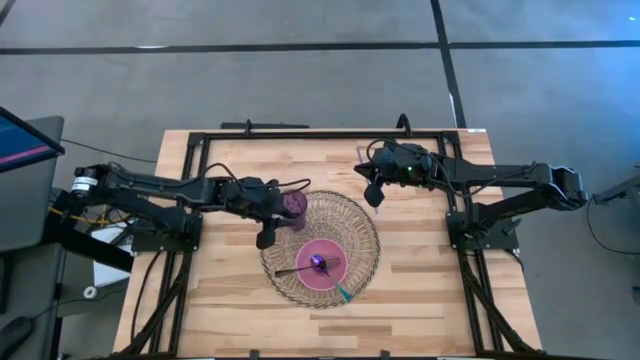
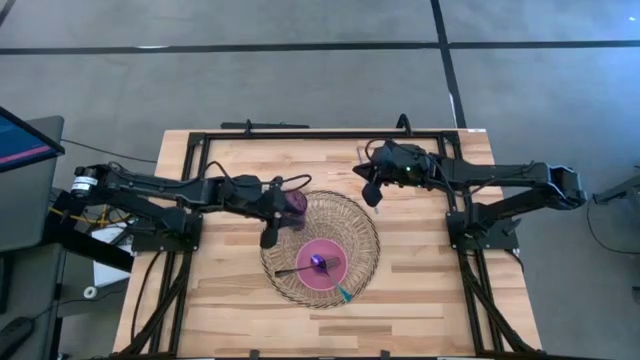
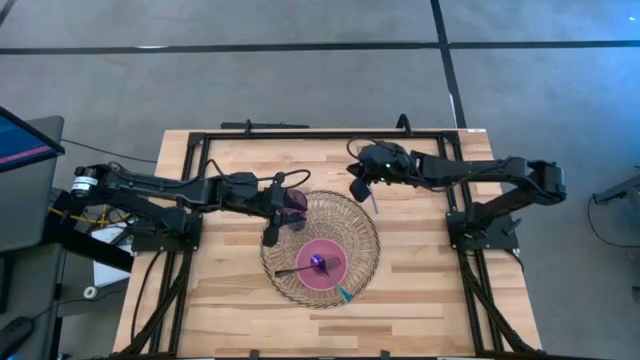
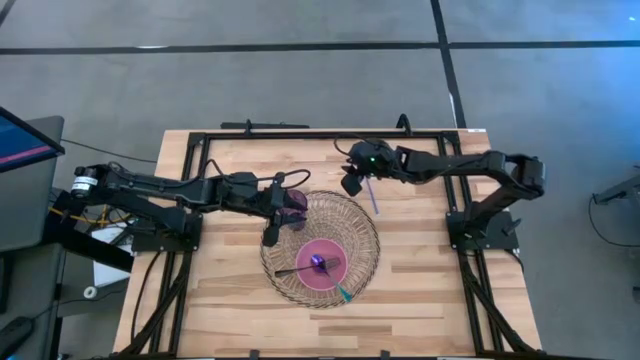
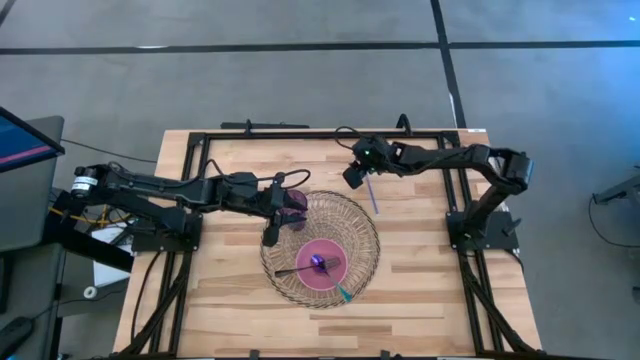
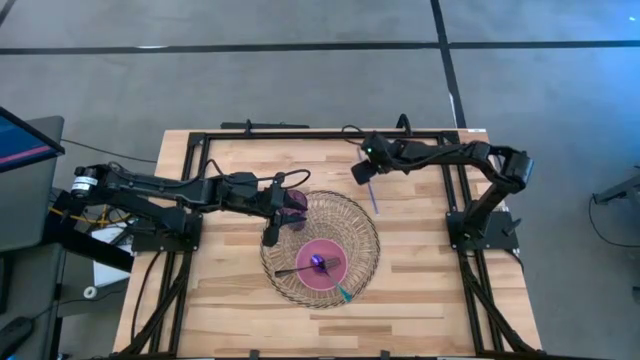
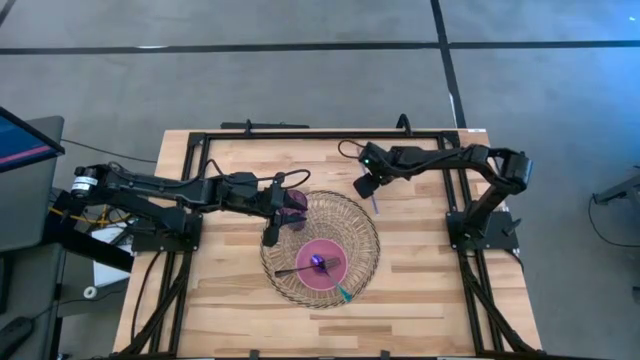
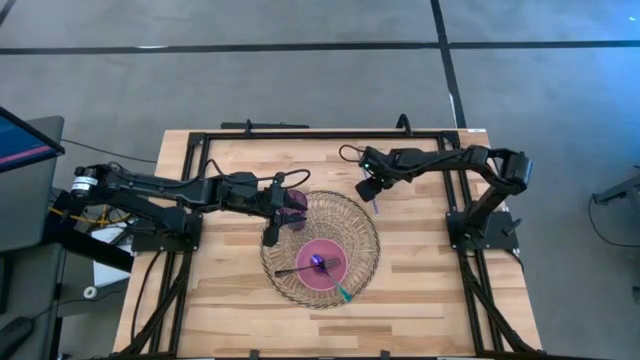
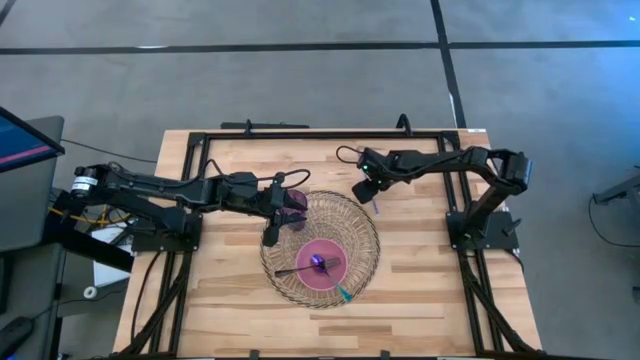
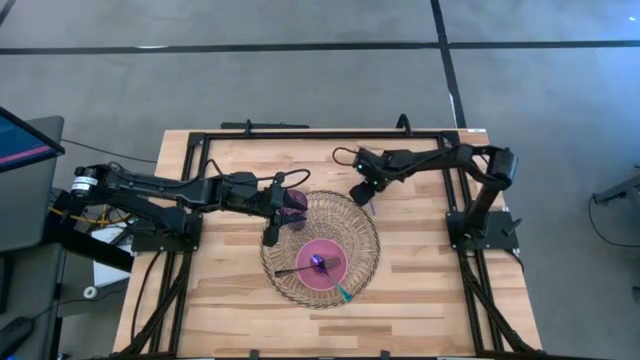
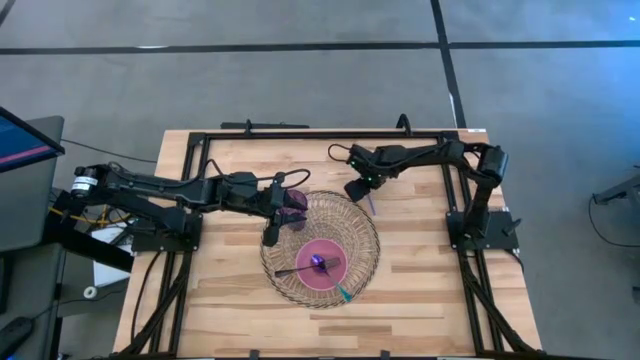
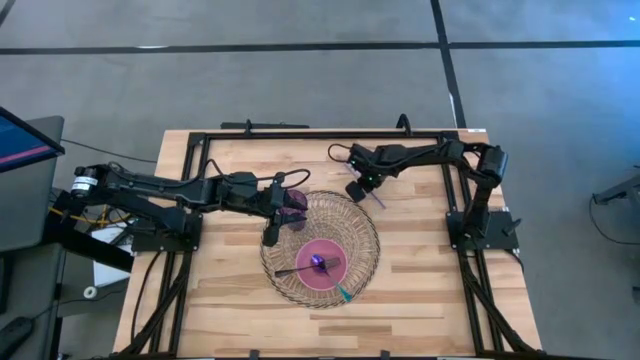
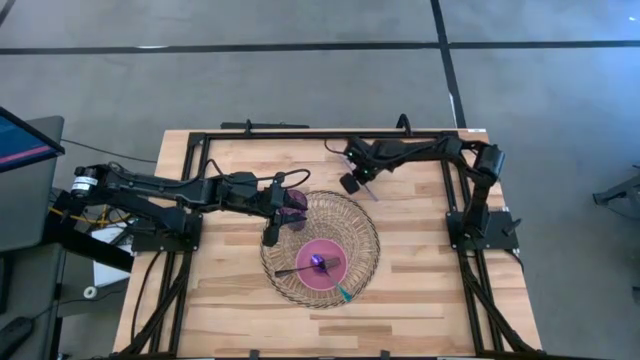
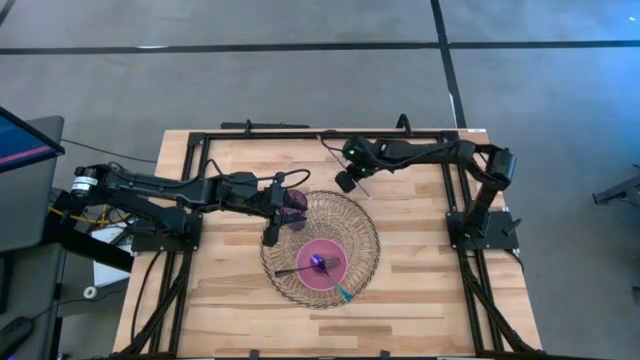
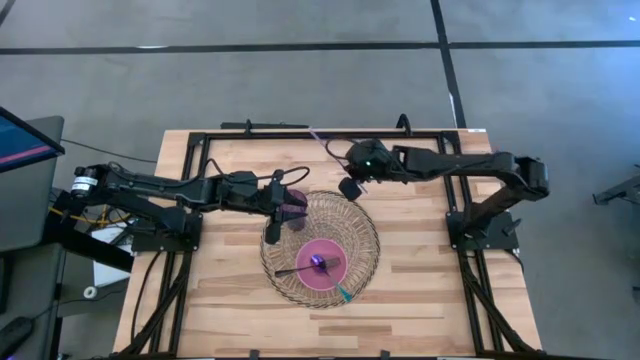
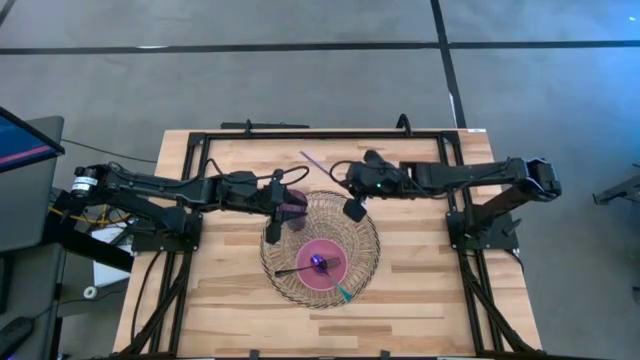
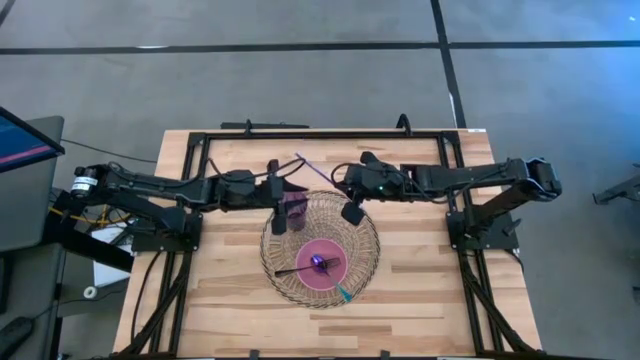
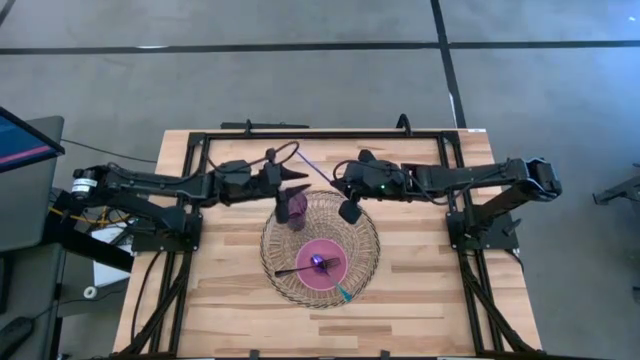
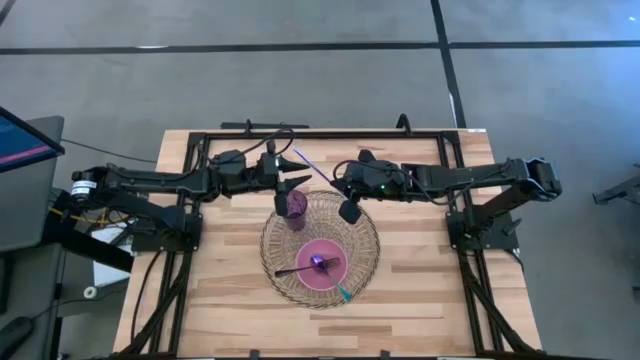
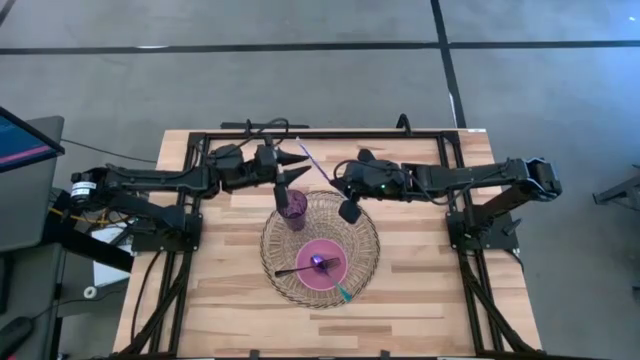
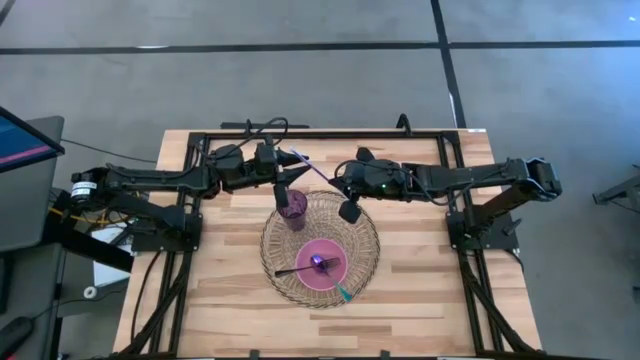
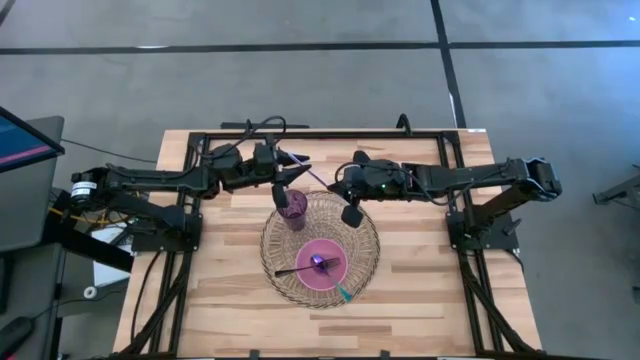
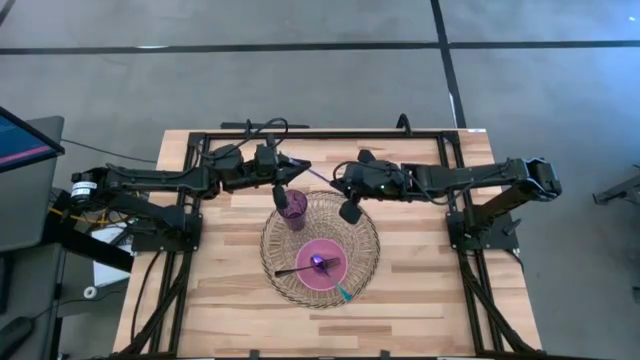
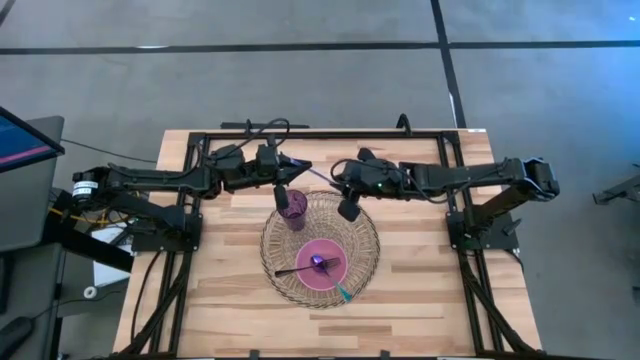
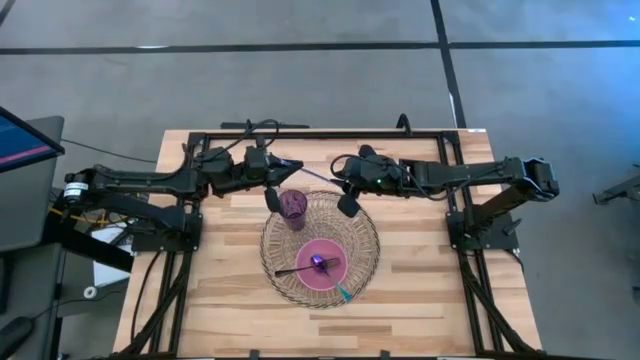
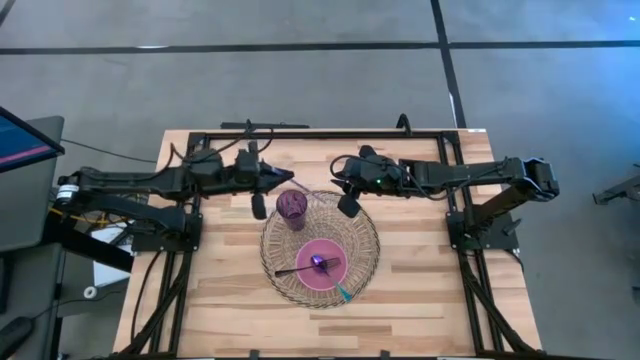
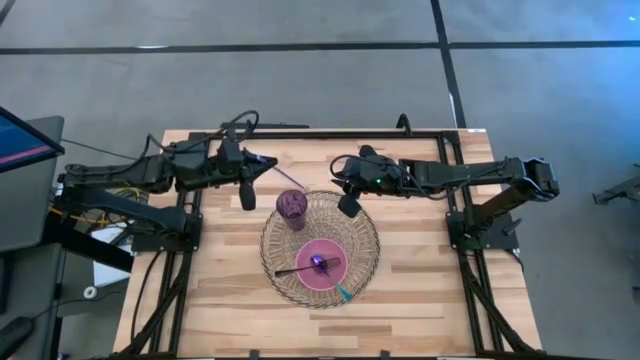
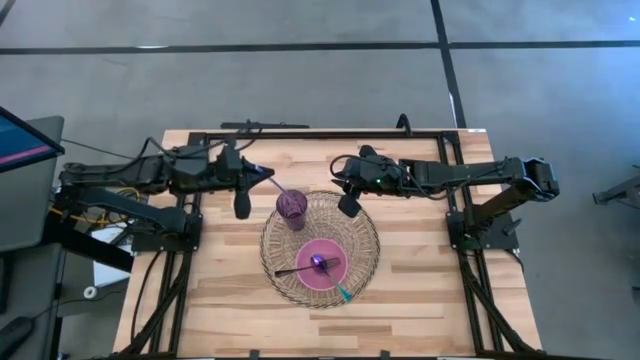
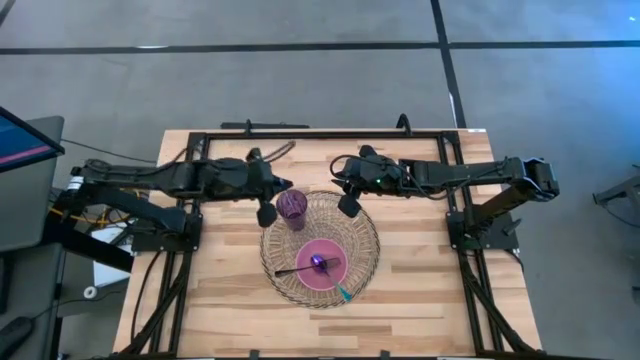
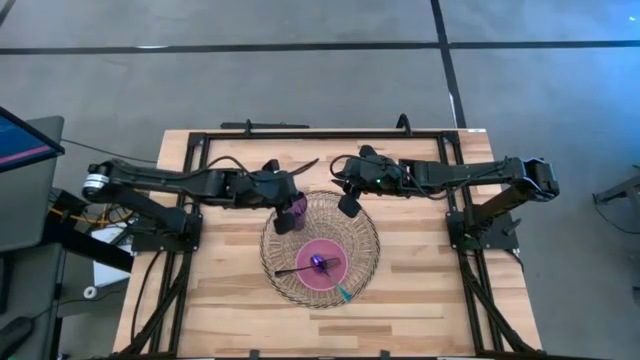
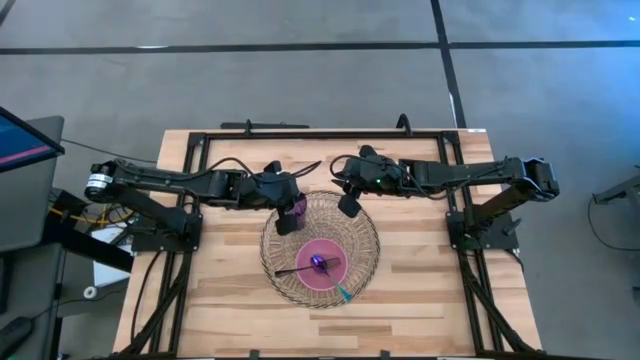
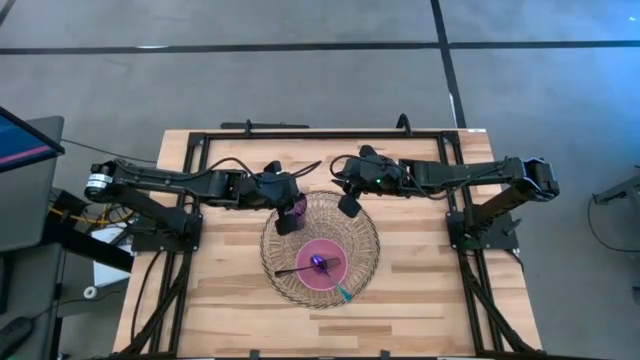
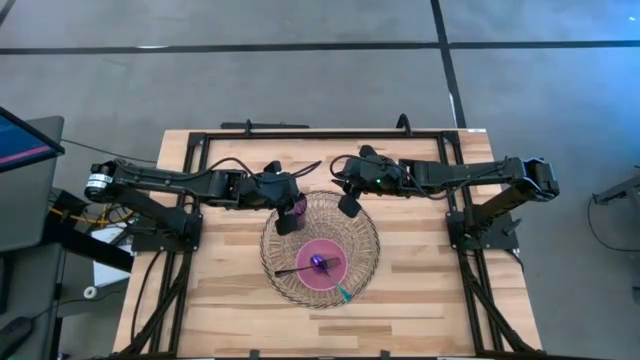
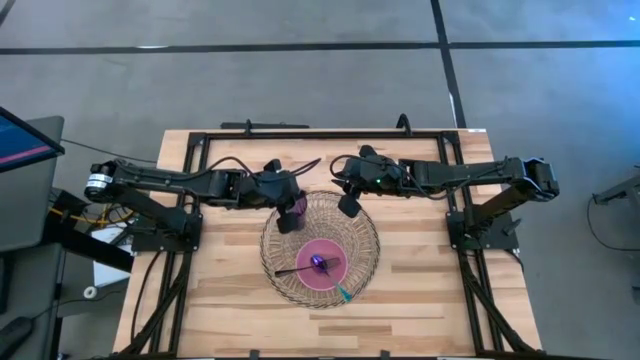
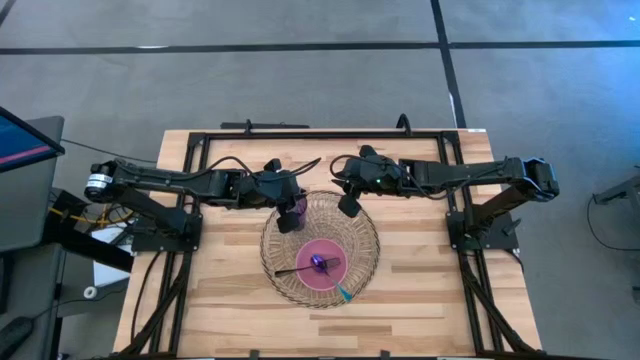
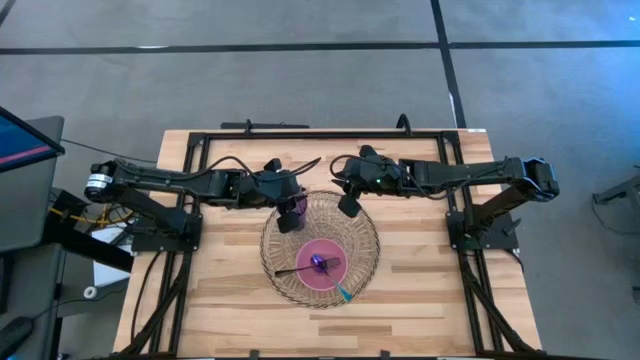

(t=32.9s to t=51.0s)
Task: Pick & Place Utensil
Put the blue straw into the violet cup

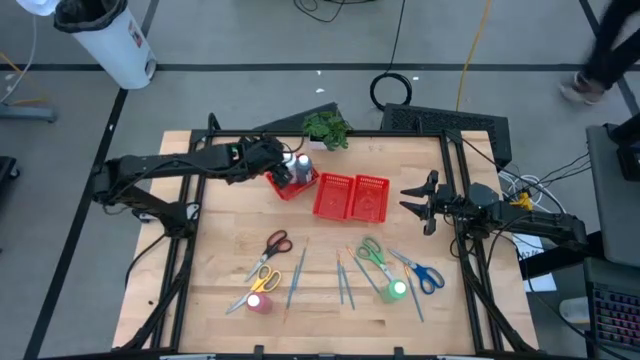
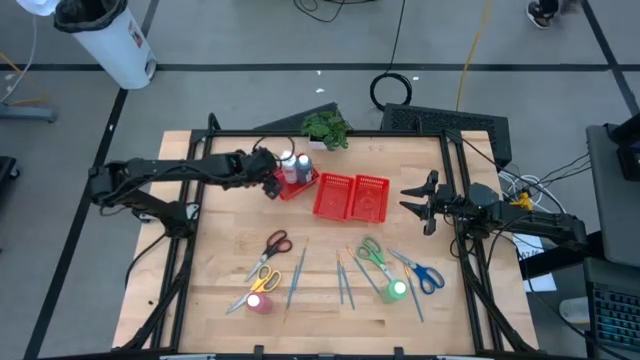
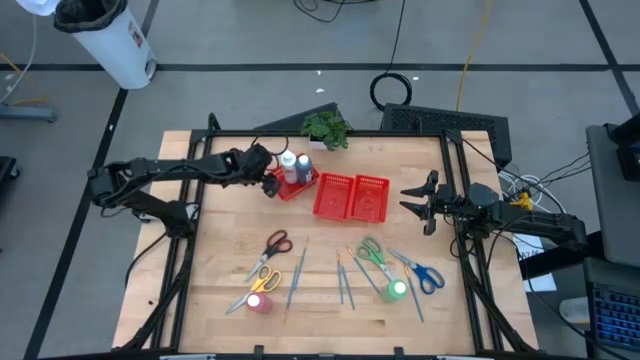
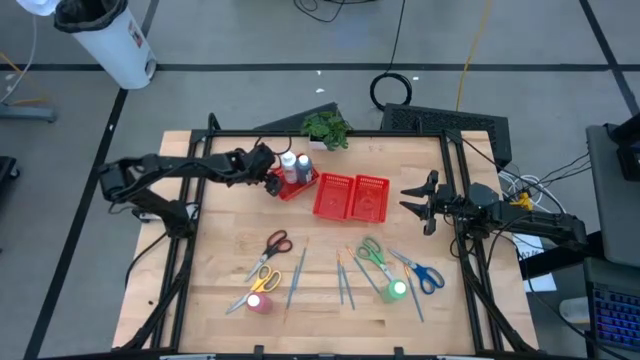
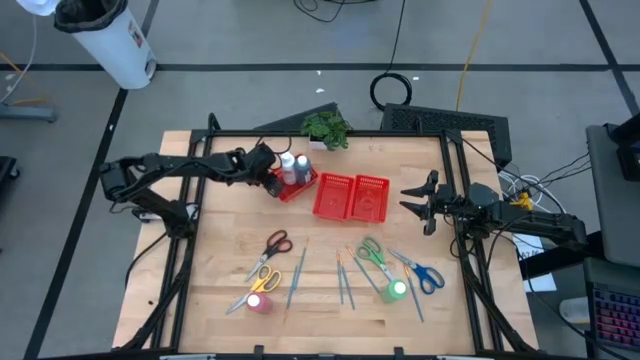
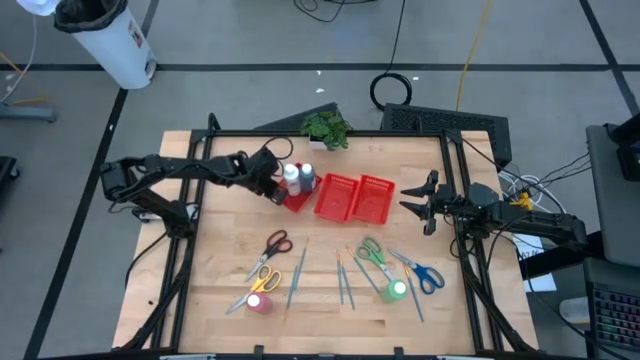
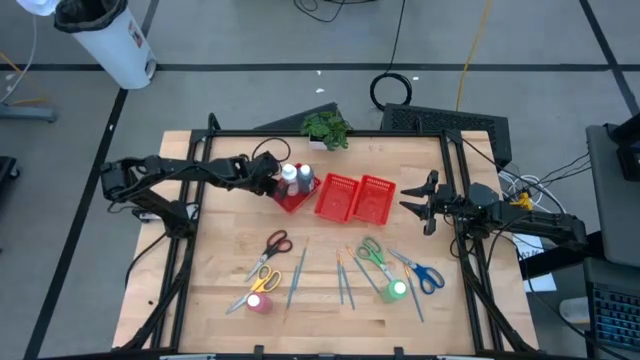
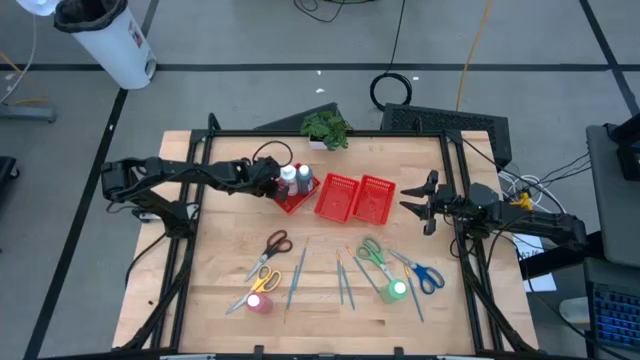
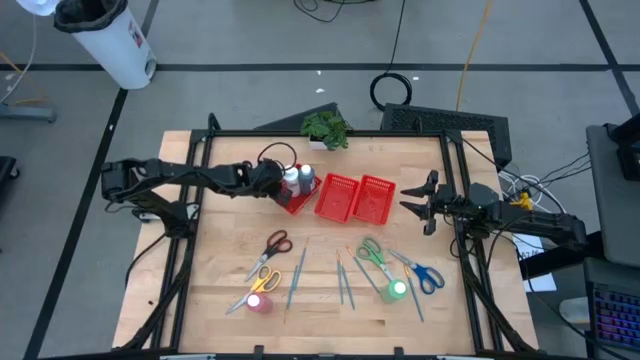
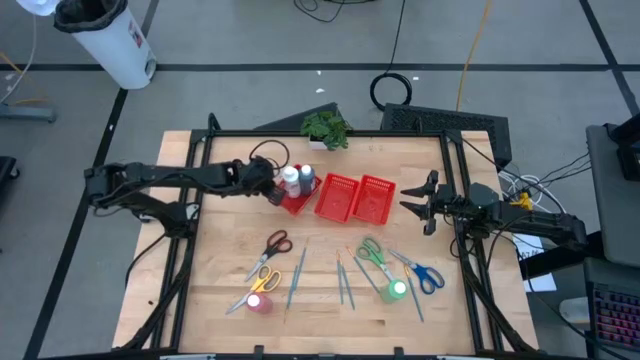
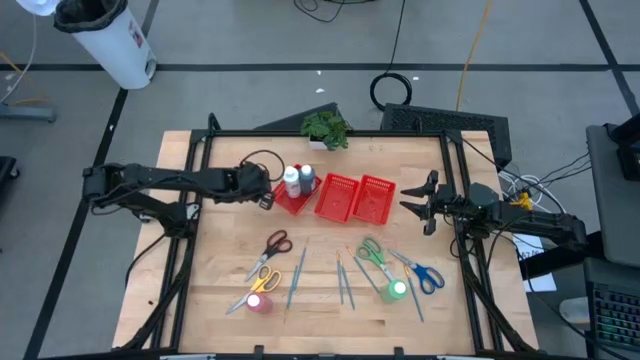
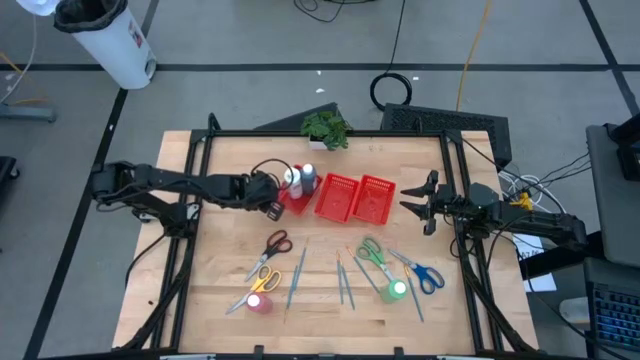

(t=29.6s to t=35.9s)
Task: Pick & Place Paint Supplies
Adjust the left red bin on the table
